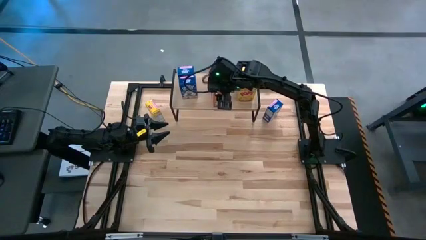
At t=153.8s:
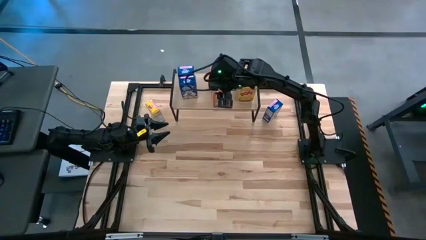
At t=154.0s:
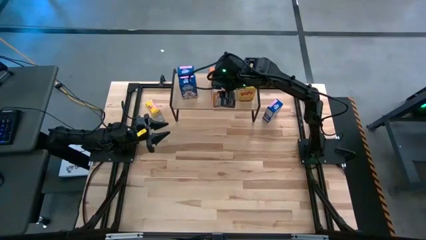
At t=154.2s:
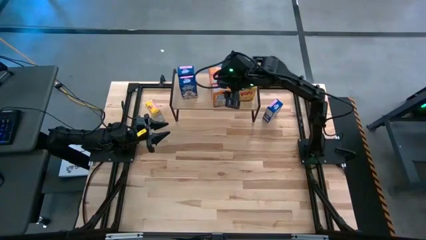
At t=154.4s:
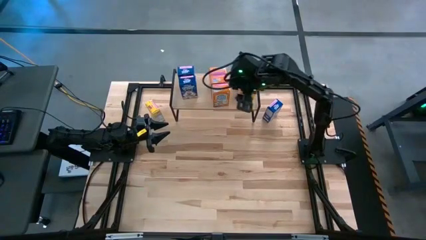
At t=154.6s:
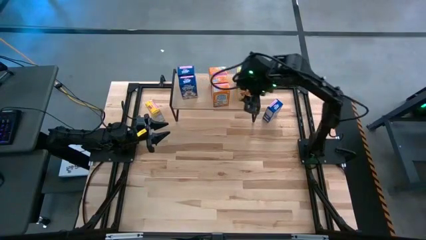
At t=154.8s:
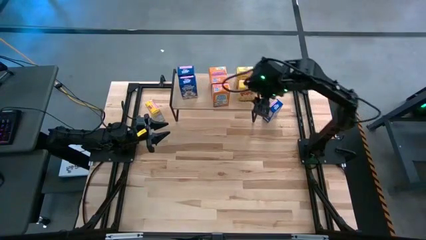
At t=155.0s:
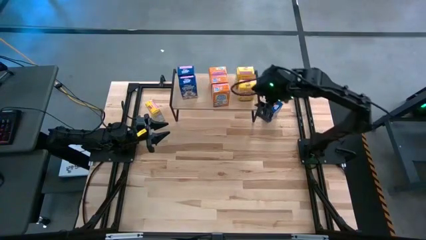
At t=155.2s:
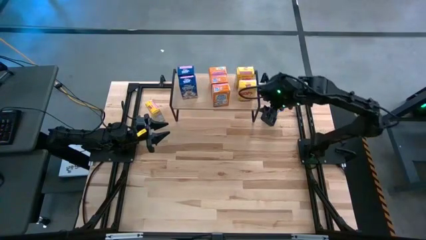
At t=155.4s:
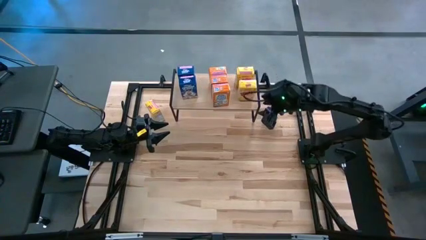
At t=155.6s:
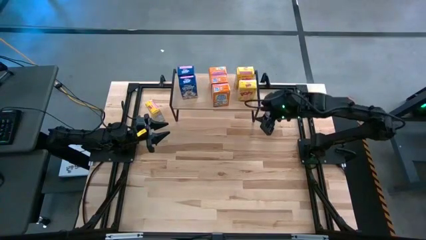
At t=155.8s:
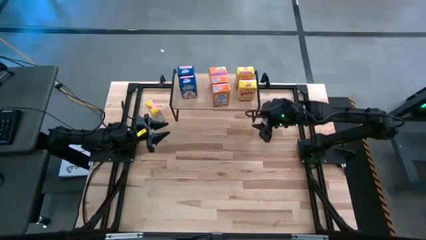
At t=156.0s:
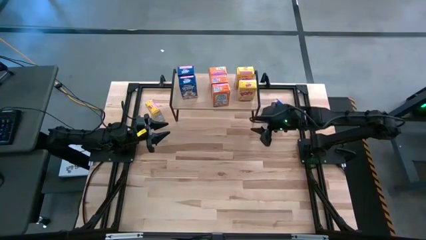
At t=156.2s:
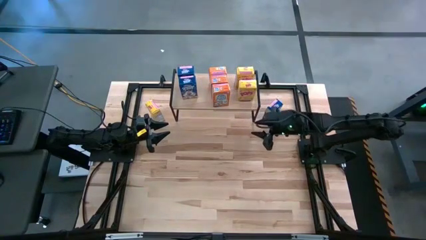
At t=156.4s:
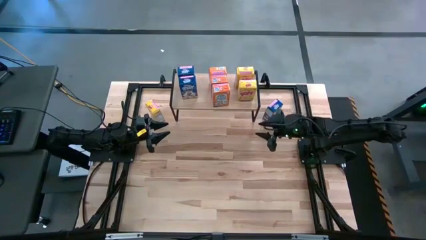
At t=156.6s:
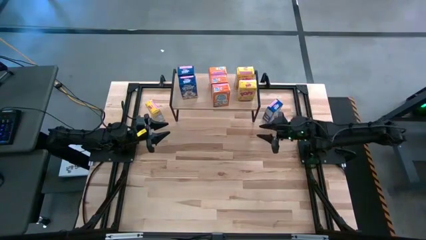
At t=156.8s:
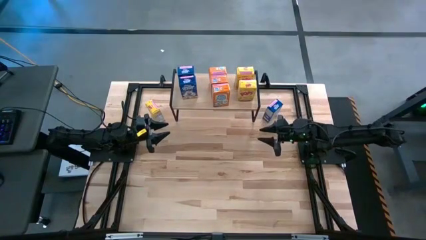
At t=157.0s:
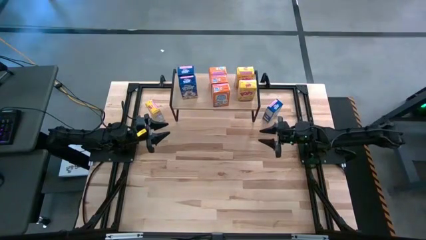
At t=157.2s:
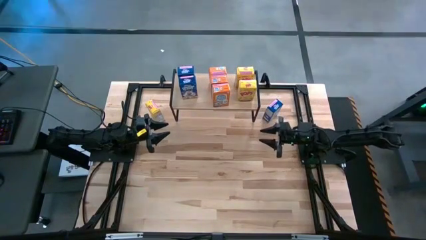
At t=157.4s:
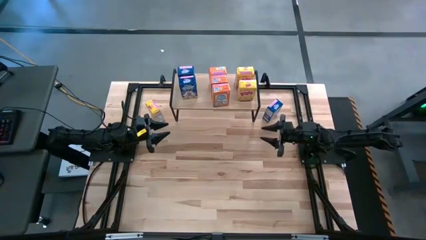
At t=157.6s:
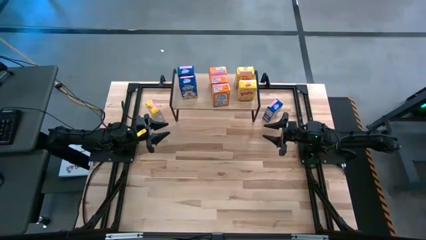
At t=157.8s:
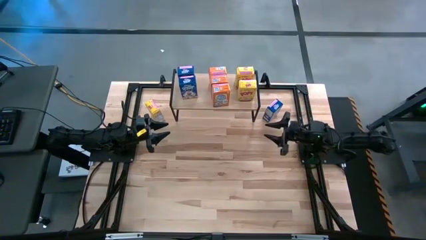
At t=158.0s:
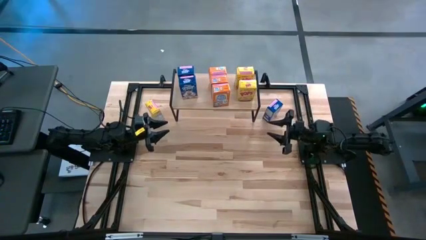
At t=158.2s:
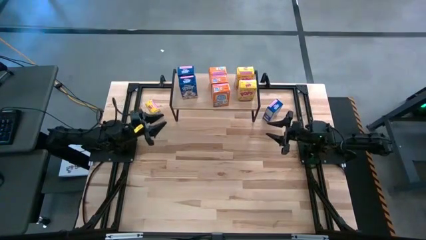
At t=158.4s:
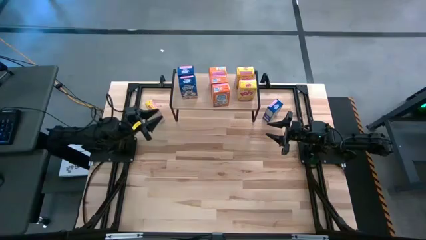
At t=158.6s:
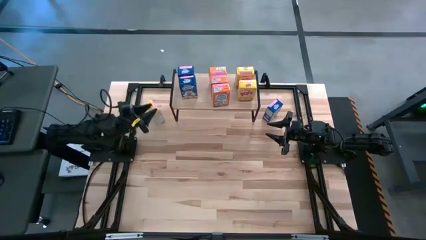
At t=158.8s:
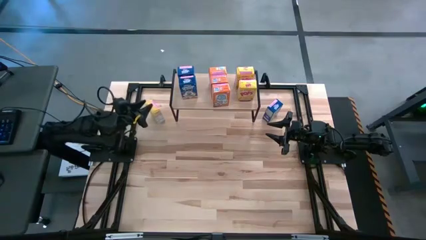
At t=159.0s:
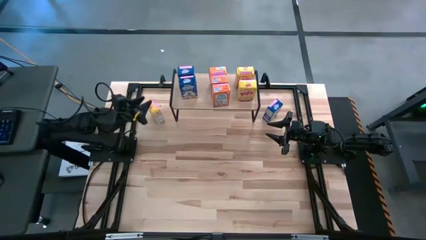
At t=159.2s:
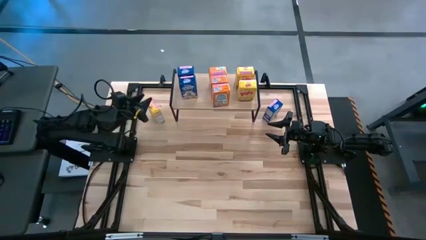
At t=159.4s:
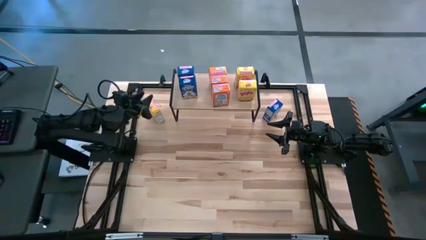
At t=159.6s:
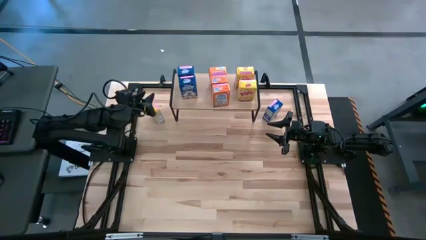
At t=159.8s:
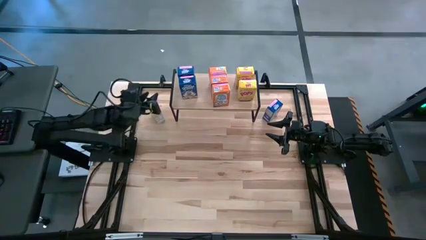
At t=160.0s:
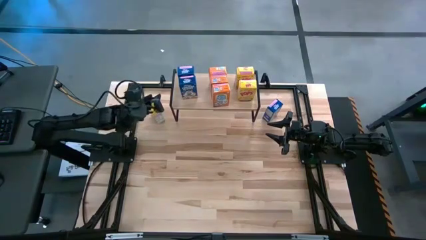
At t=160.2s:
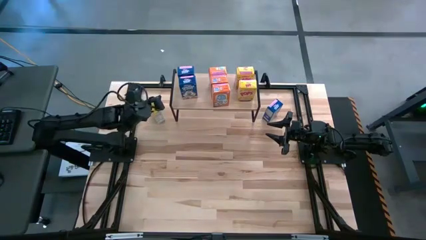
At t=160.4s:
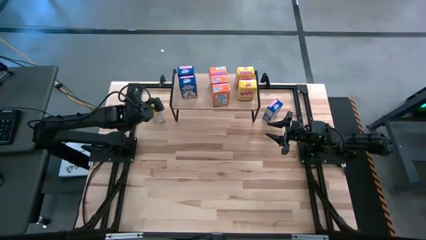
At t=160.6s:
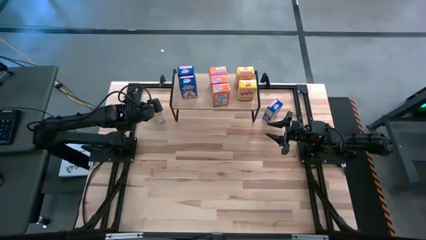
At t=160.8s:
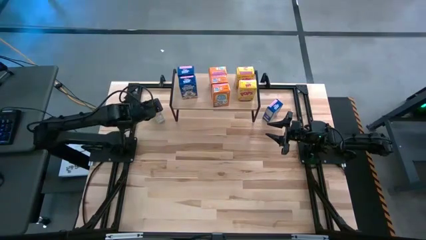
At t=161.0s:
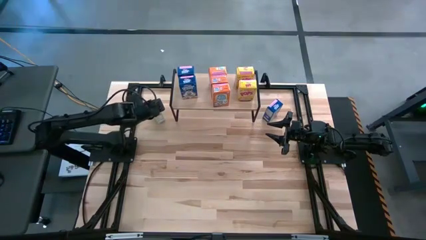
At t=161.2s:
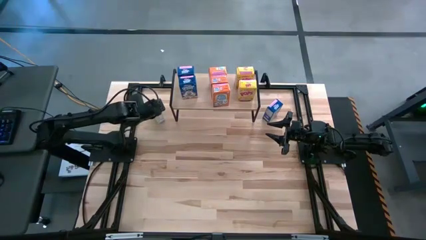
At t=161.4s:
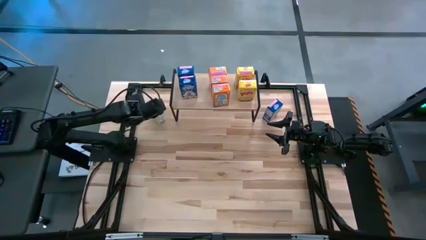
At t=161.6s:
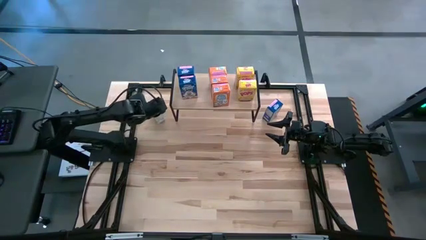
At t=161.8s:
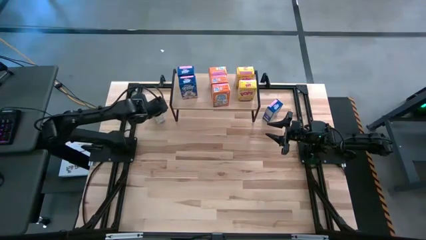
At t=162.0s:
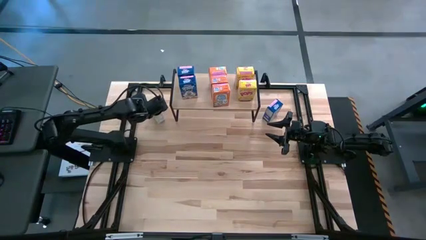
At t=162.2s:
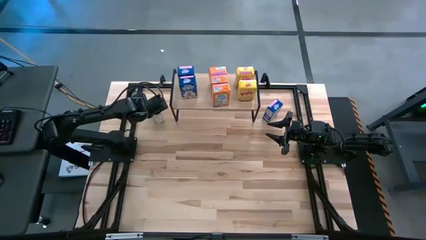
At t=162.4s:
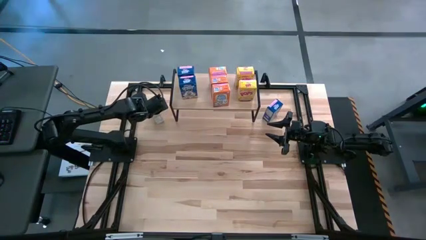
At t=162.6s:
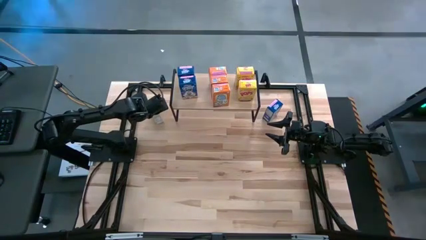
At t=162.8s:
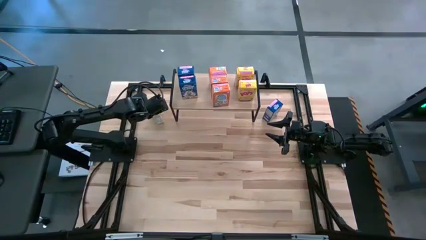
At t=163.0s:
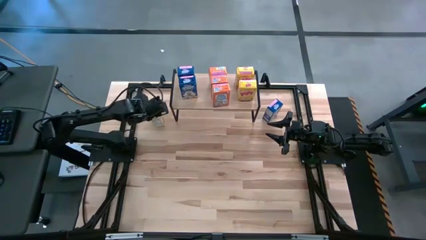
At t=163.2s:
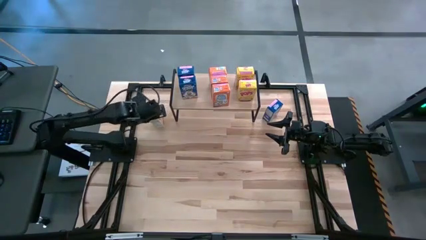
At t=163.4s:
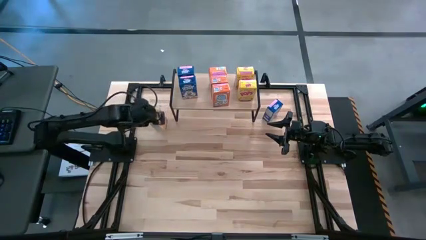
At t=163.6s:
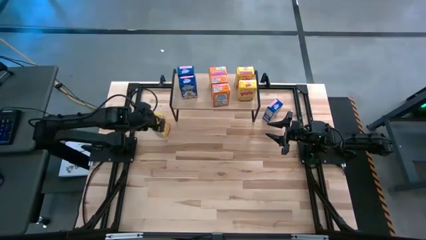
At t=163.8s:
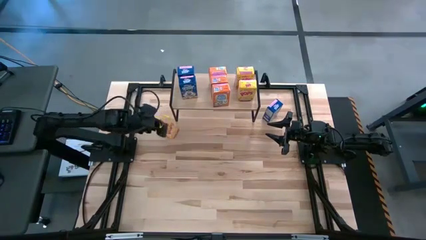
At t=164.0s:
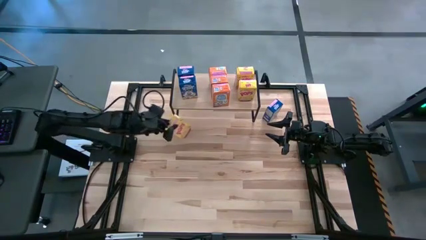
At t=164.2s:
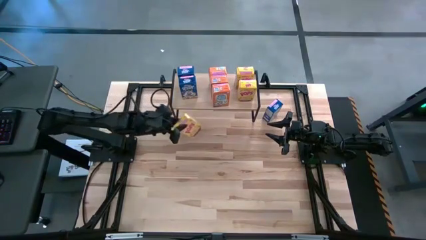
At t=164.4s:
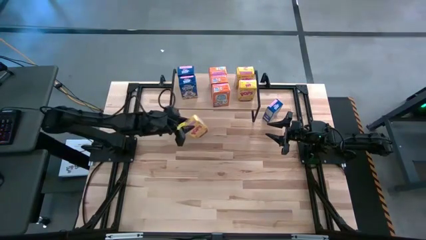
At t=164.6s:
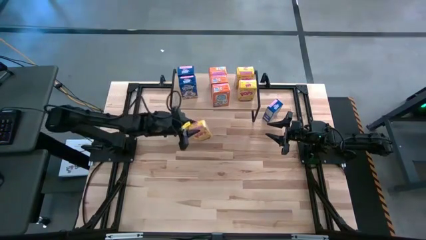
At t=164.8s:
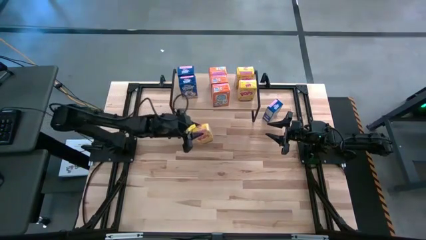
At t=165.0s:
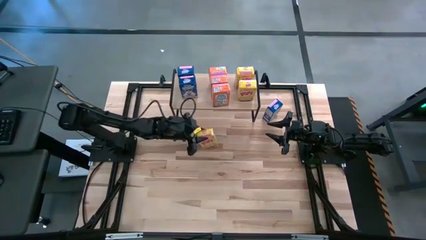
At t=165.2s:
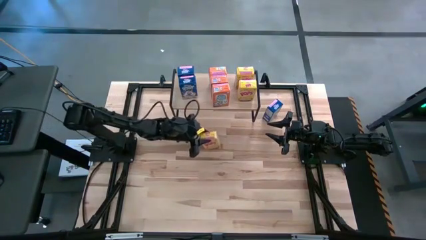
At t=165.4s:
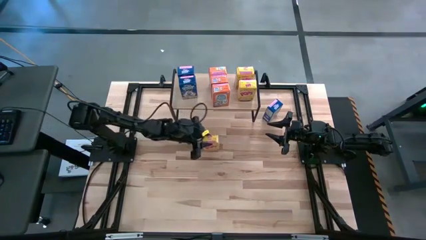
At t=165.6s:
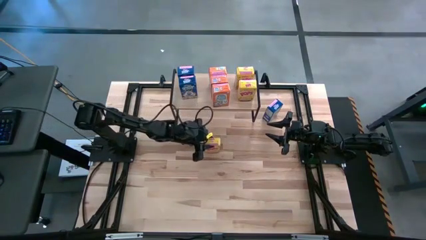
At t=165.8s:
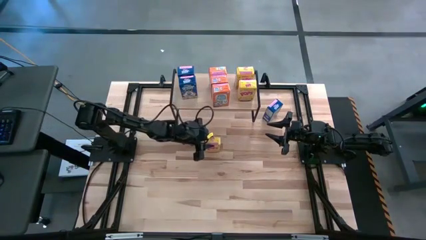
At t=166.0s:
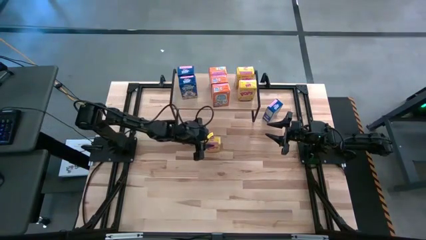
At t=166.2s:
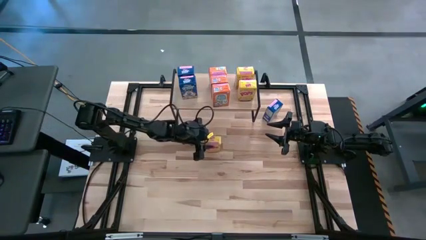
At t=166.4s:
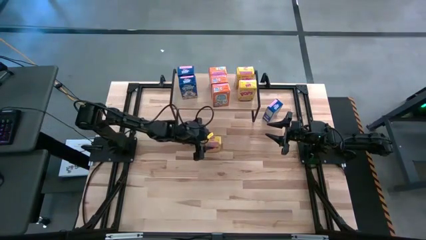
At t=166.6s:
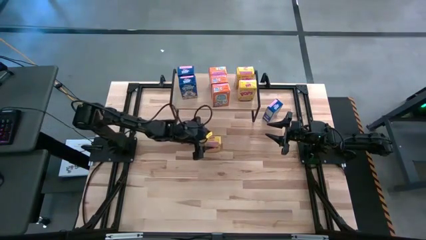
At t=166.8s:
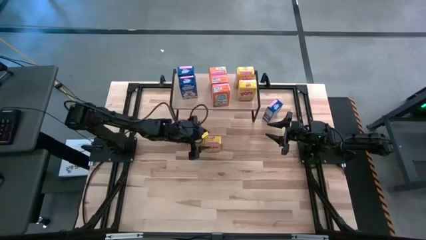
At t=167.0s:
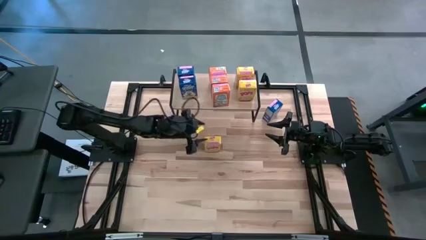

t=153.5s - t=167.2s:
Task: Stack cereal on shelf
Put the yellow cereal box aligned with the other yellow cereal boxes on the shelf
